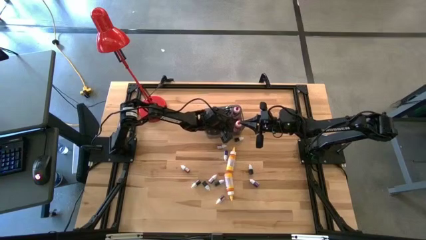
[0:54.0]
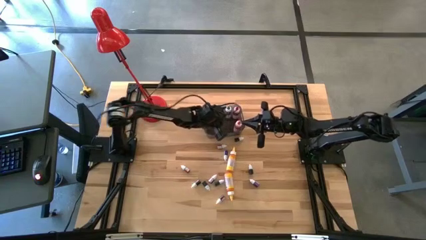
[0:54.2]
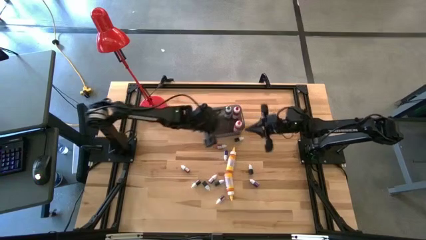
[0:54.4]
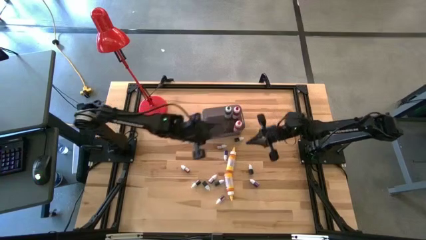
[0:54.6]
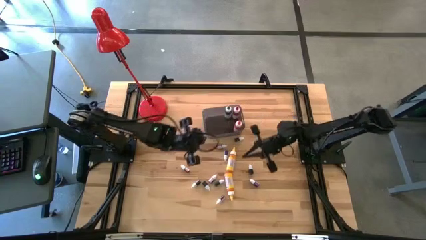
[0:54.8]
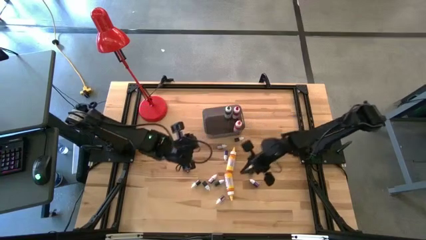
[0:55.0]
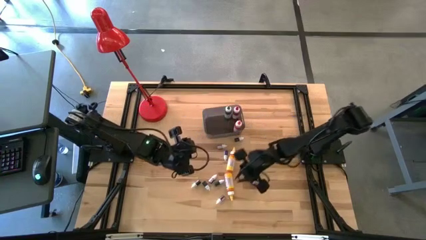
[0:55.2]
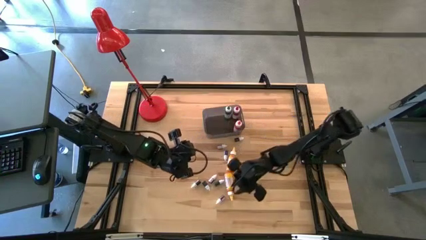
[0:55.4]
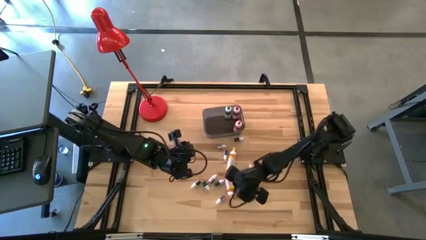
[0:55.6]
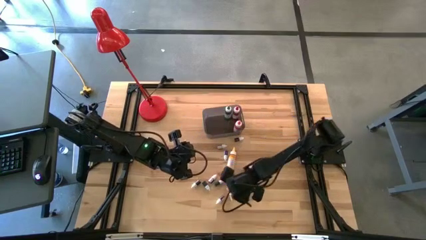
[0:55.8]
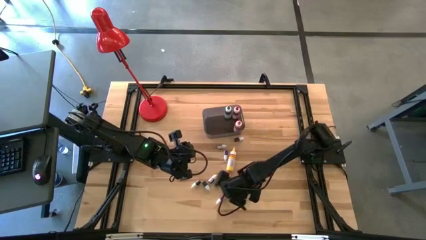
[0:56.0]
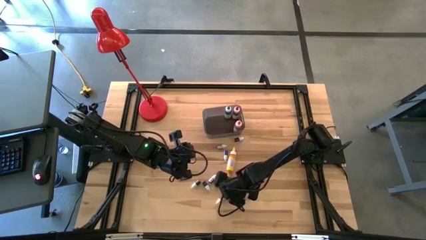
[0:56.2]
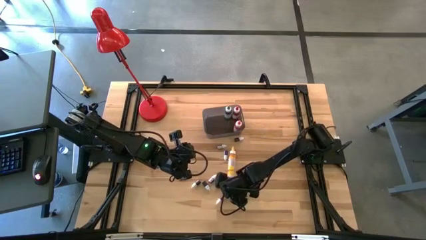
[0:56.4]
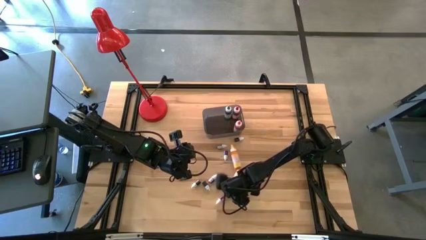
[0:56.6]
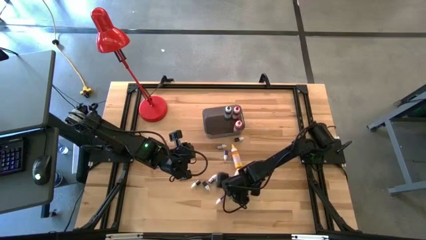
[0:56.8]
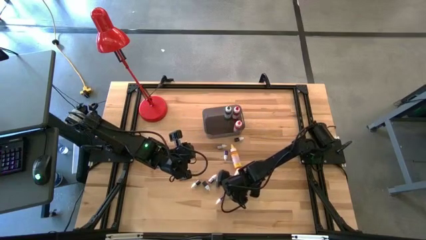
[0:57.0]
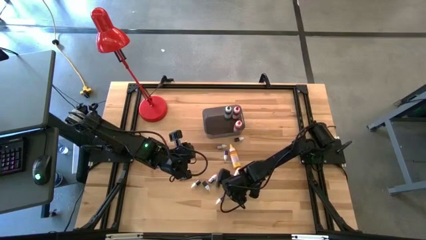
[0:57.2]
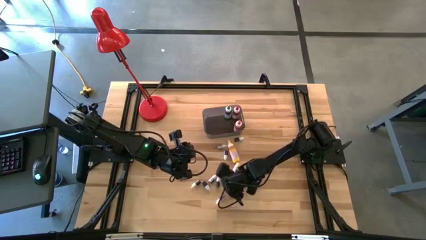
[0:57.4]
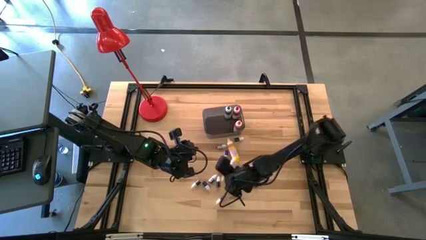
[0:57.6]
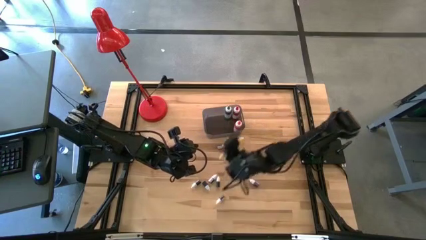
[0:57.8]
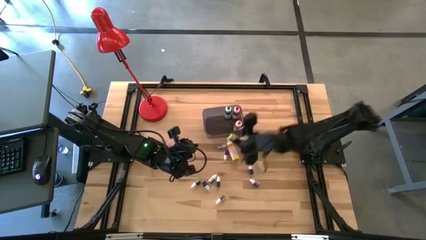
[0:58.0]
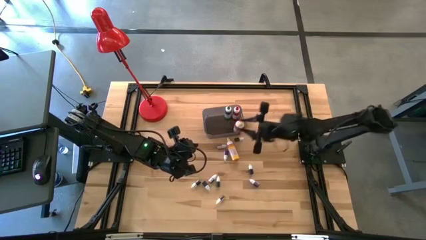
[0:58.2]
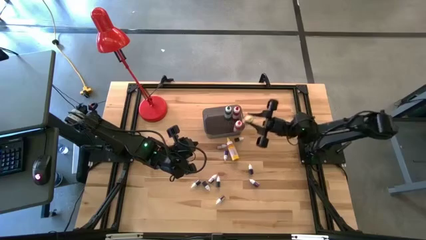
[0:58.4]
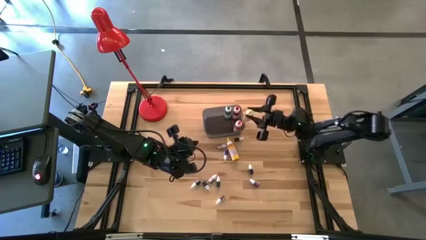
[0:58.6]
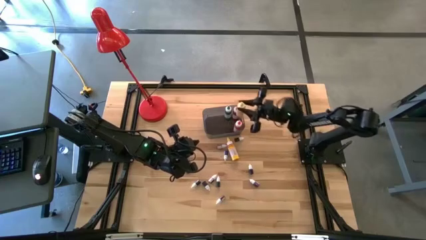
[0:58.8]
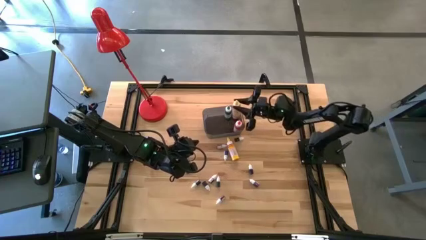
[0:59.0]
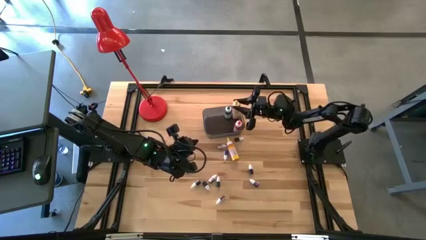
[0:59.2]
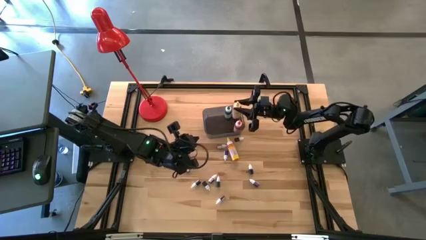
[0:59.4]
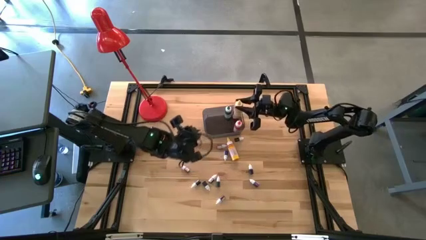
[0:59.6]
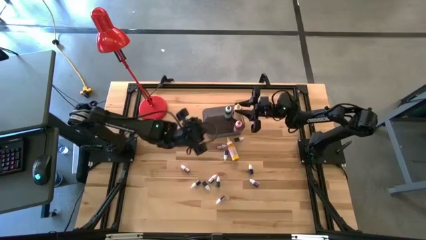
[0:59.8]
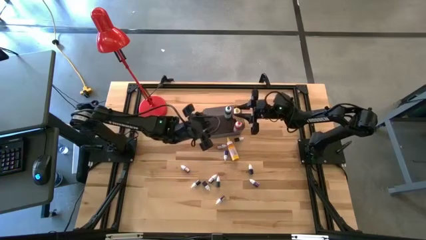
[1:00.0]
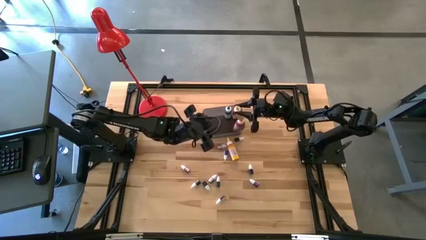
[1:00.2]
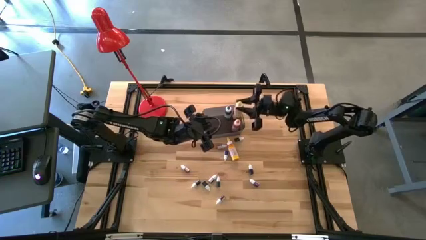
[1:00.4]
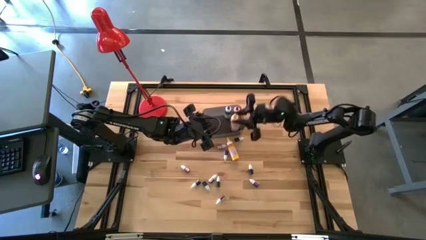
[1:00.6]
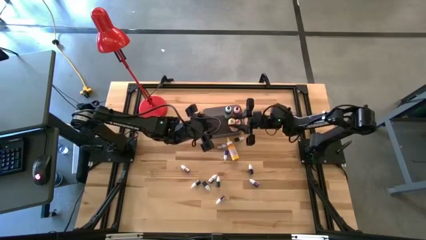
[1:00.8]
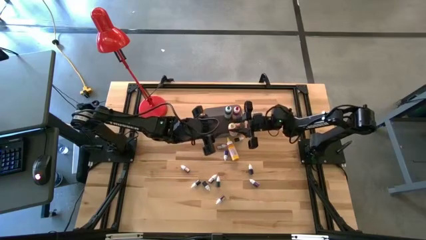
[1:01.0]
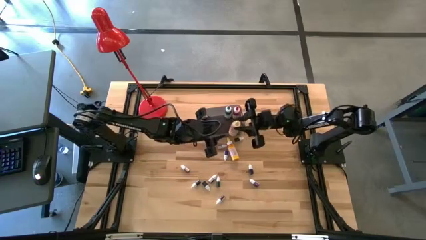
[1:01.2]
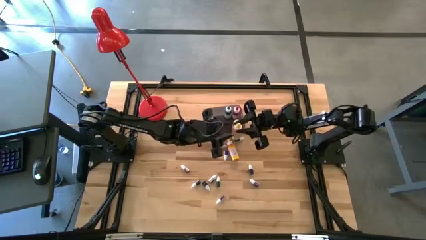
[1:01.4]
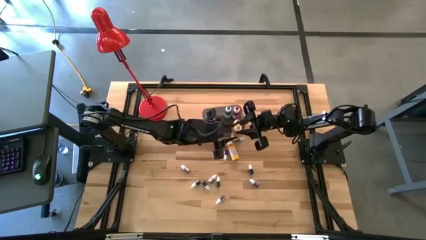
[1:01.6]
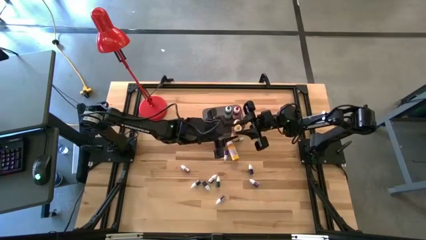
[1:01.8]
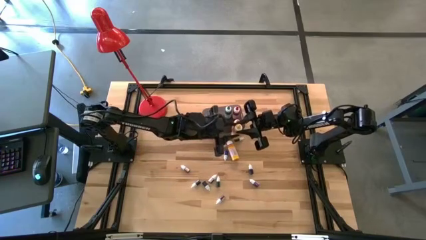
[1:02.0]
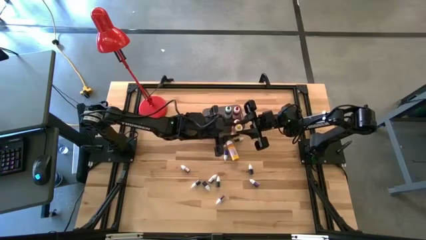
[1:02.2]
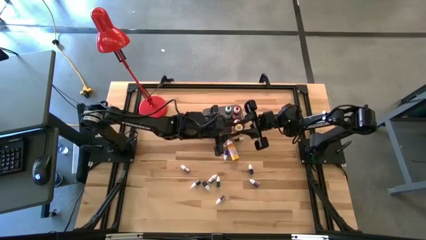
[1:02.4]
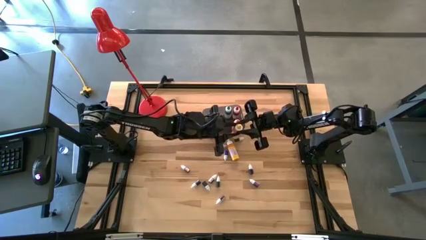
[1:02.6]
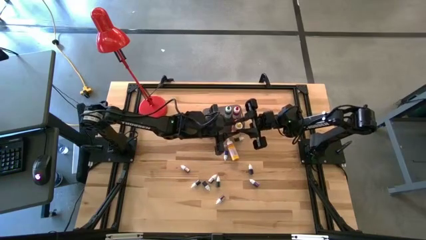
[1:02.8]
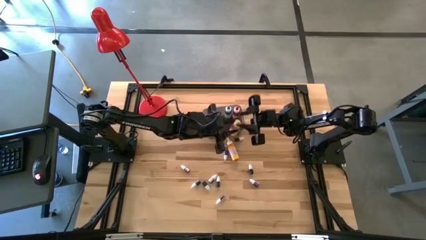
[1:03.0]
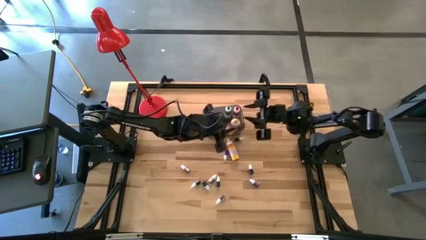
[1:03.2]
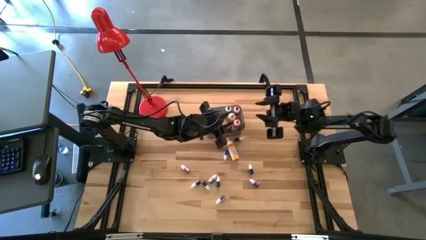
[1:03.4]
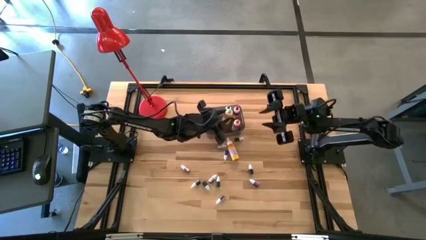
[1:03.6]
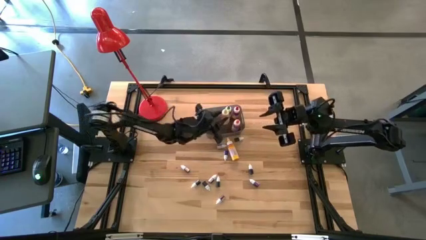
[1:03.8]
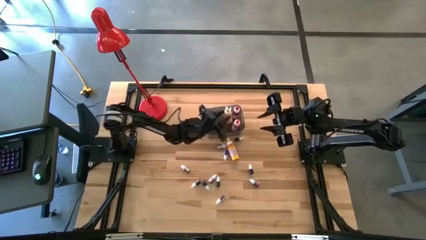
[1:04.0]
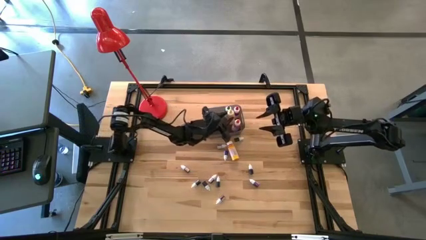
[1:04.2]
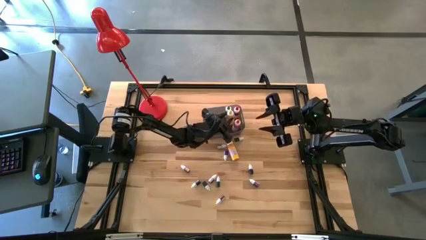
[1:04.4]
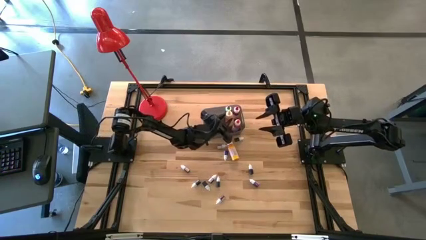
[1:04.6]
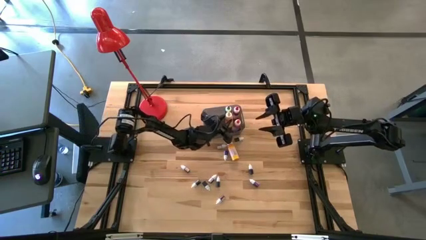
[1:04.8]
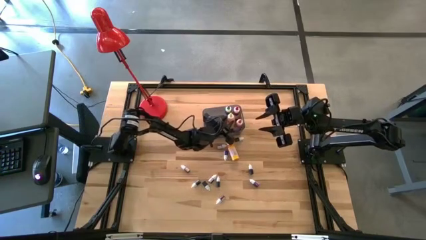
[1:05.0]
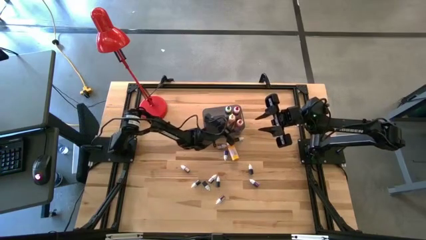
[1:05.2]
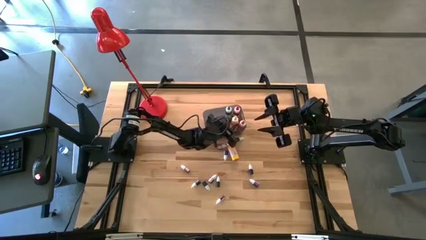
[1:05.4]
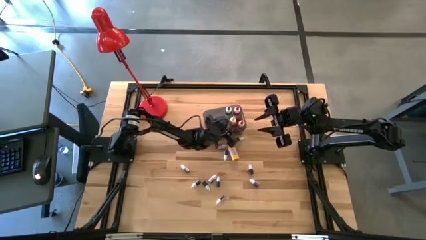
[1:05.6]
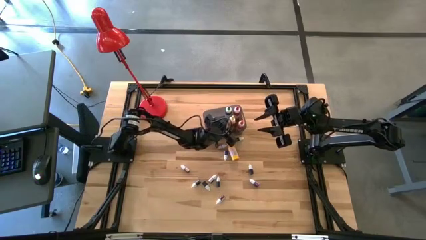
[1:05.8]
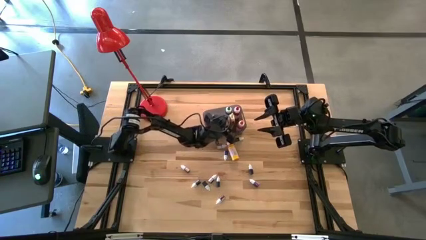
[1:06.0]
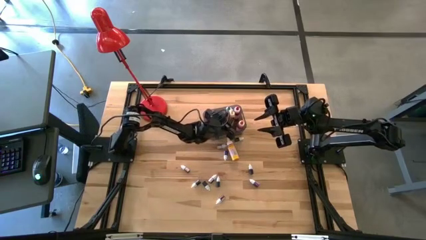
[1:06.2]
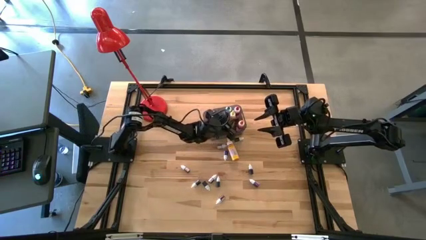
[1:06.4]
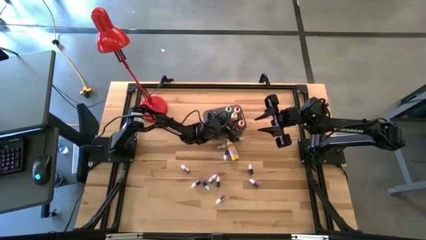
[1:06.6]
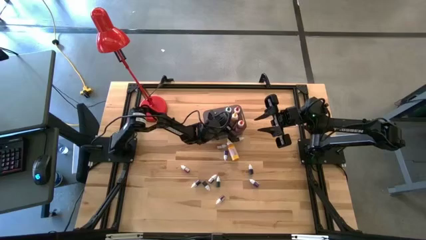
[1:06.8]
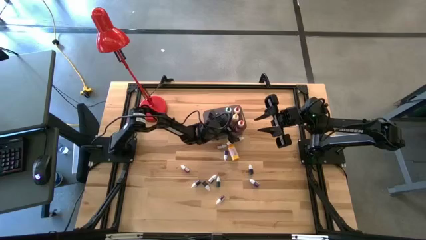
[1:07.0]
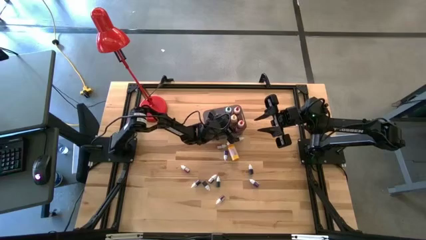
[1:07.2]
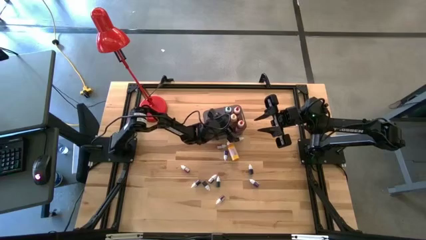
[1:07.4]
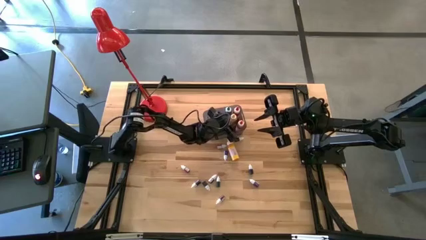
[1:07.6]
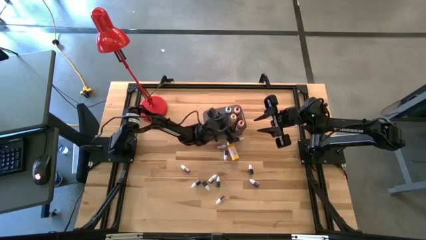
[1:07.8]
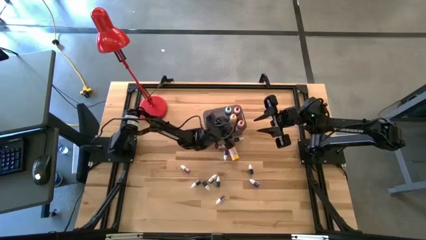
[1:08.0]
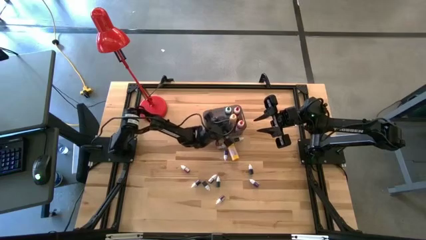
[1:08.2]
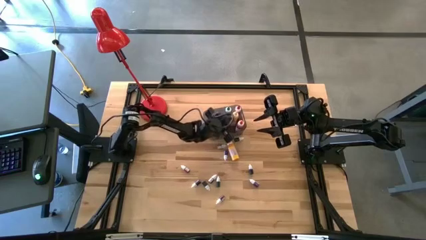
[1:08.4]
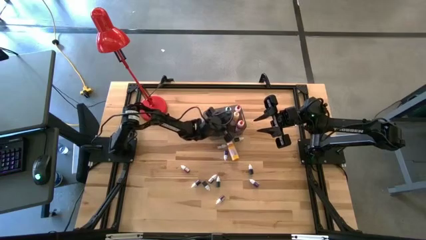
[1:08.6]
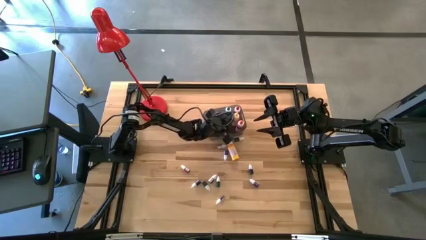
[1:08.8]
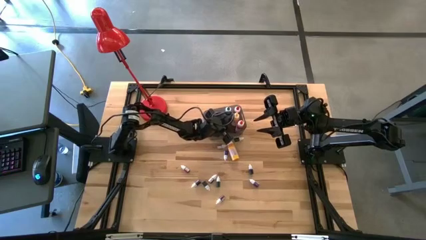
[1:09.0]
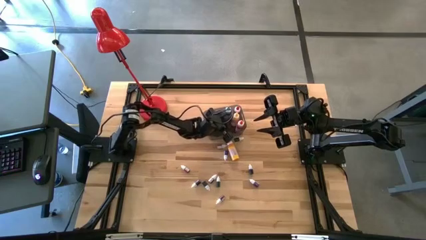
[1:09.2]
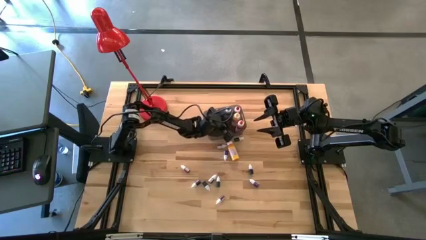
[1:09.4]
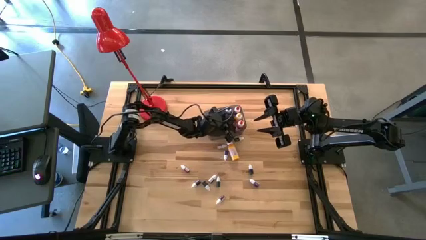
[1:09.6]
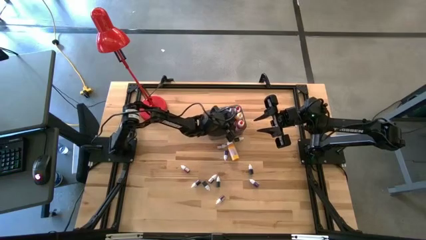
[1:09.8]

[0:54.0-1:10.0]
Task: Pick & Place food coloring
Put the large yellow food coloring bottle into the black bin

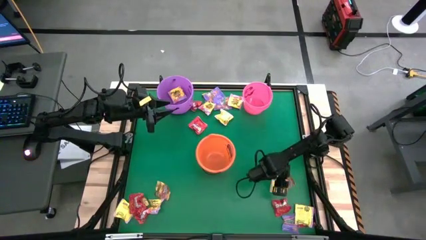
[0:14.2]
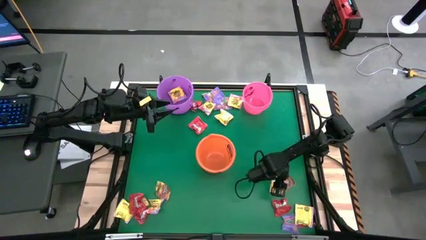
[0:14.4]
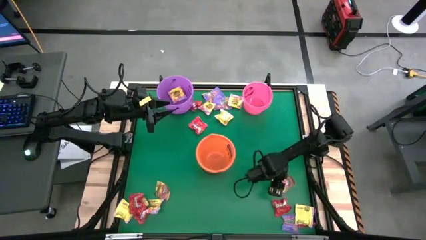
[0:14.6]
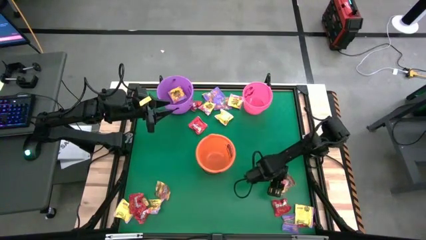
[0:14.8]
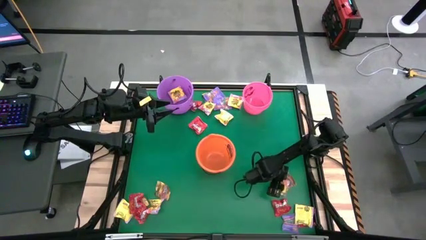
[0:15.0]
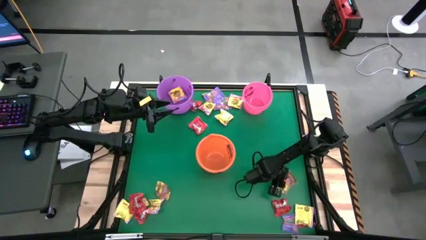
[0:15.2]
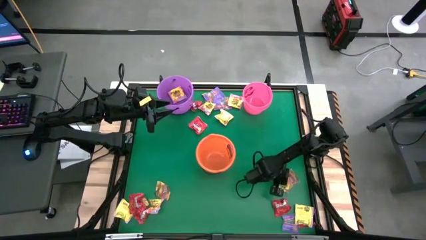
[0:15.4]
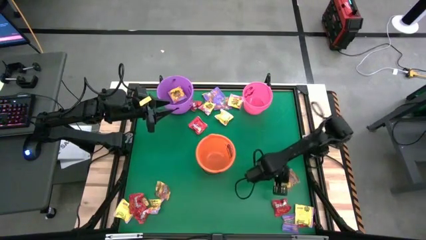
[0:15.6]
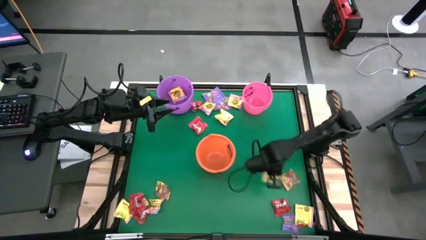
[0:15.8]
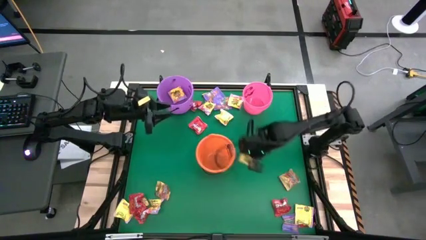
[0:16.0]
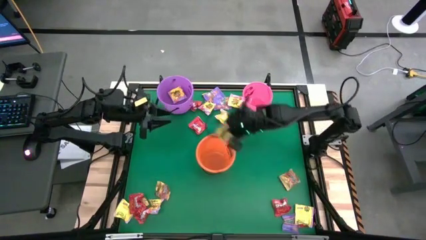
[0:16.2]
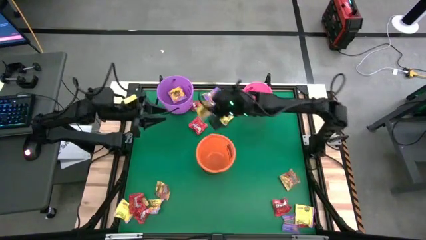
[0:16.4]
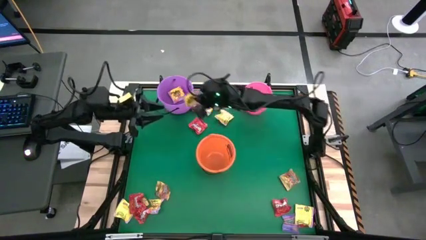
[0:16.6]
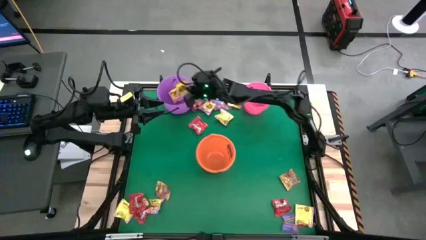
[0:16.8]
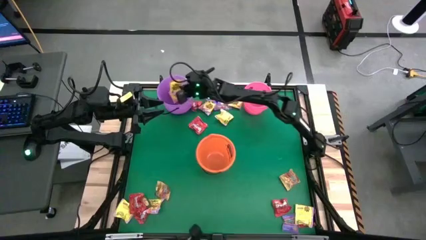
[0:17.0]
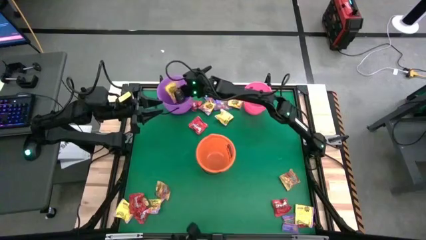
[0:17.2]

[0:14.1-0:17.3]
Task: Sort candy by brand, put in halloween buckets
Put the yellow candy into the light violet bucket
